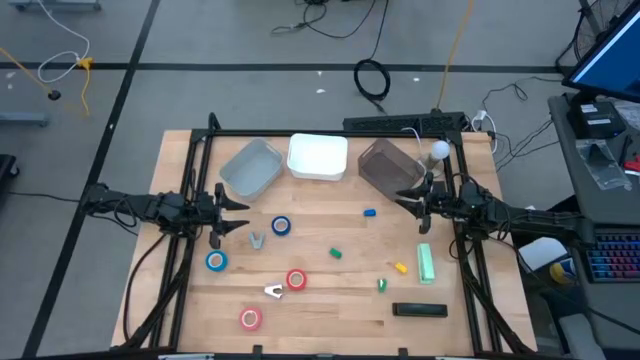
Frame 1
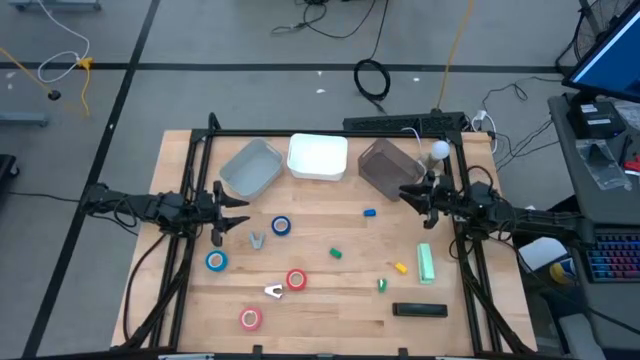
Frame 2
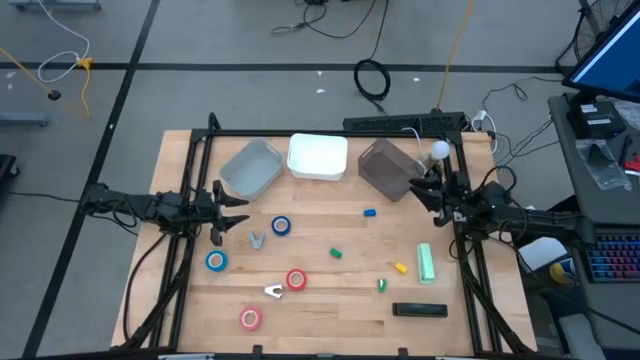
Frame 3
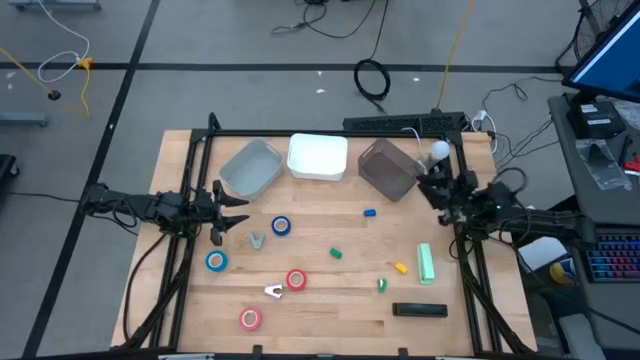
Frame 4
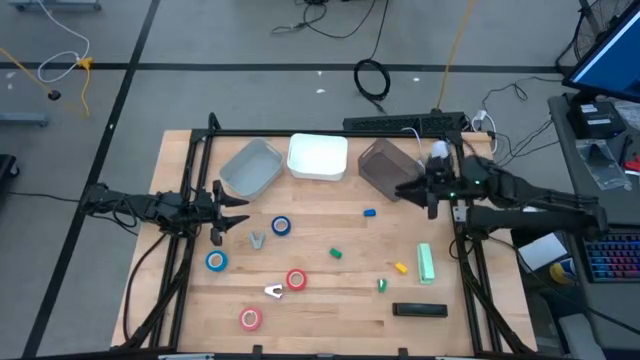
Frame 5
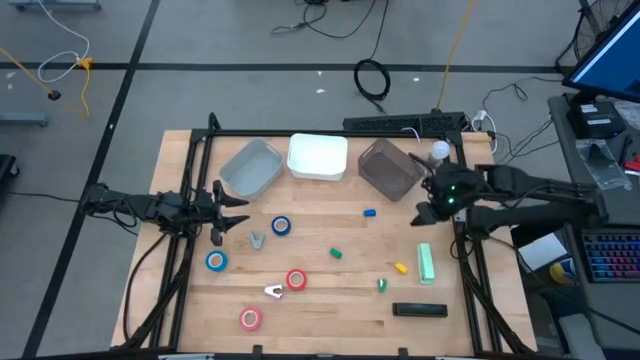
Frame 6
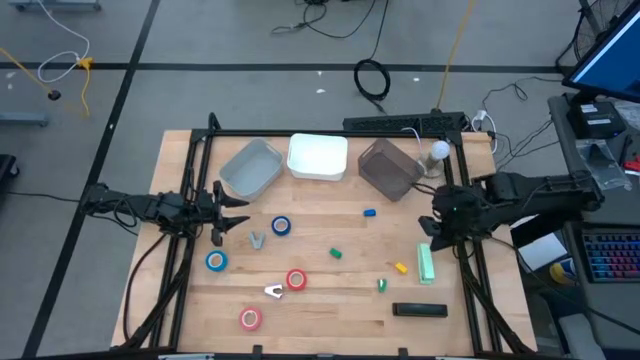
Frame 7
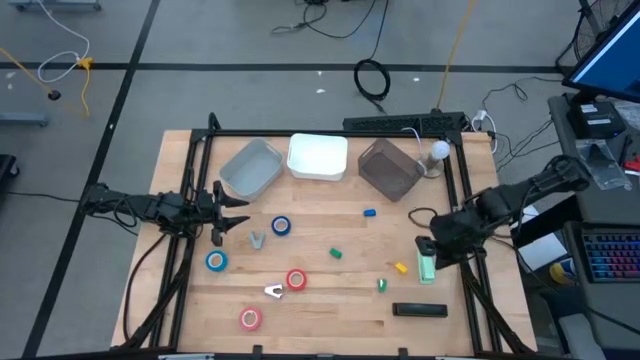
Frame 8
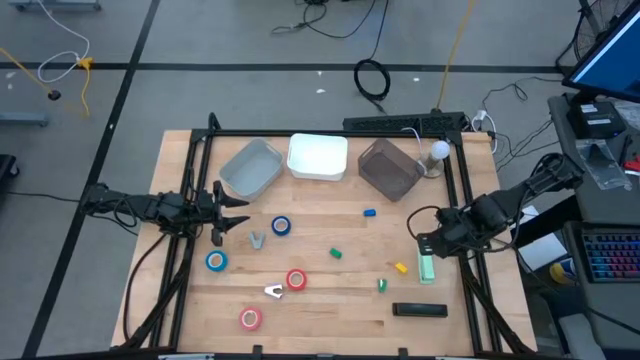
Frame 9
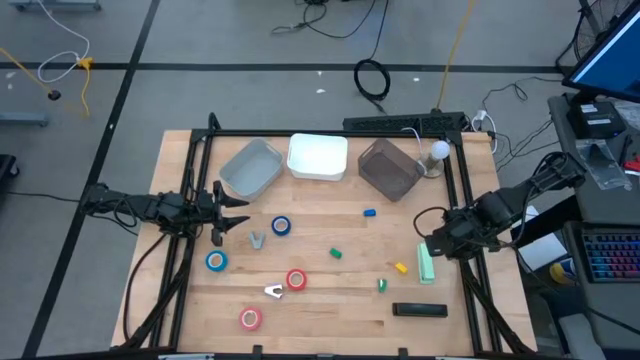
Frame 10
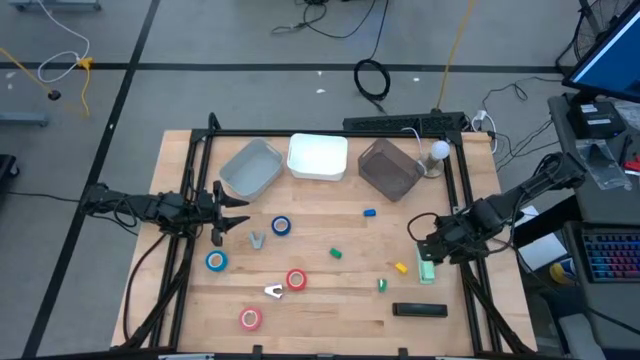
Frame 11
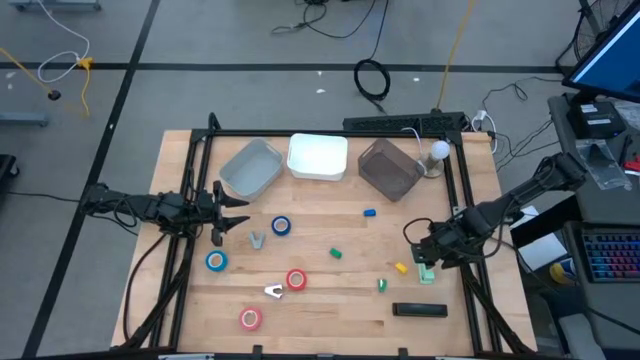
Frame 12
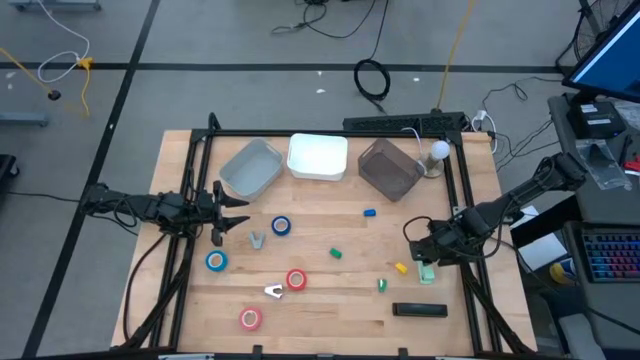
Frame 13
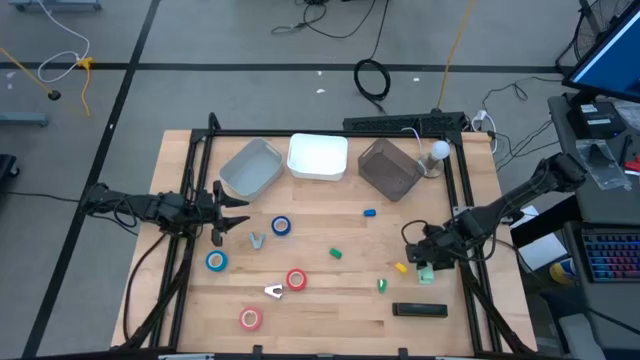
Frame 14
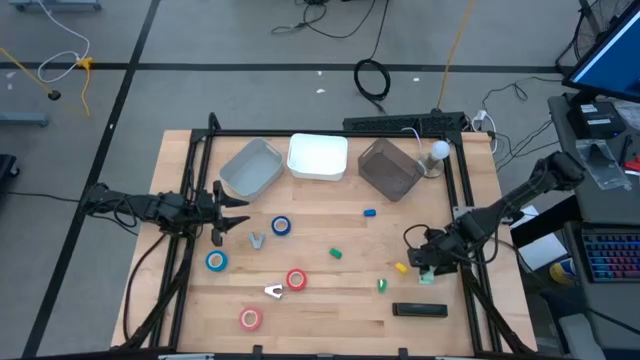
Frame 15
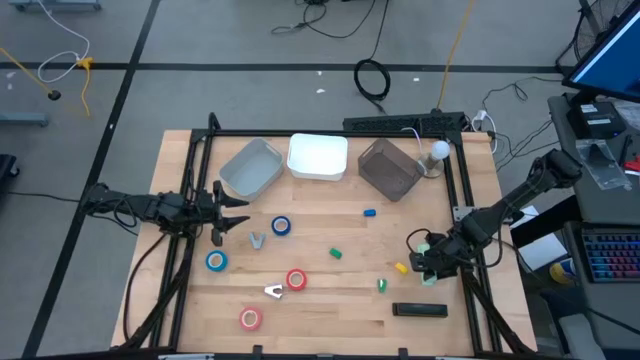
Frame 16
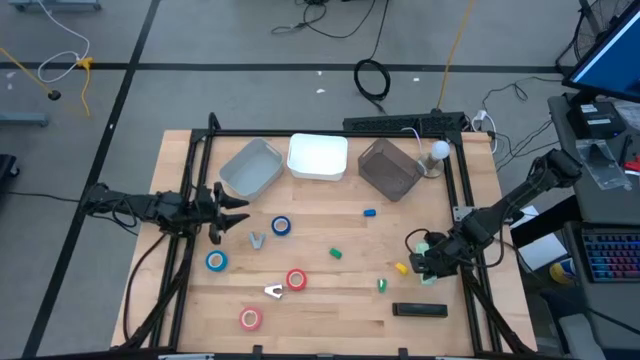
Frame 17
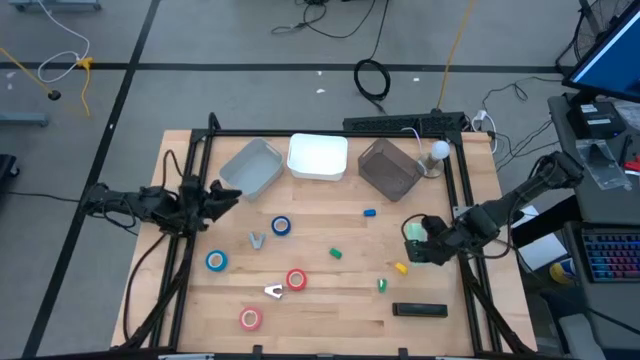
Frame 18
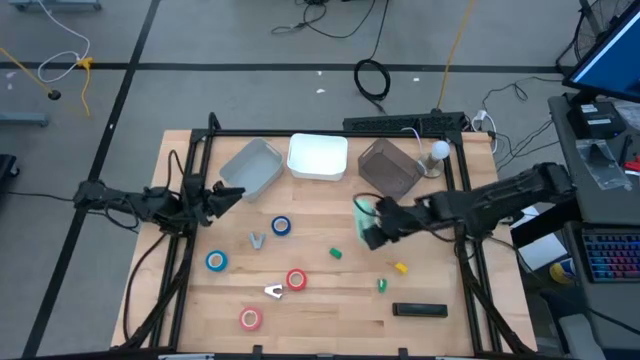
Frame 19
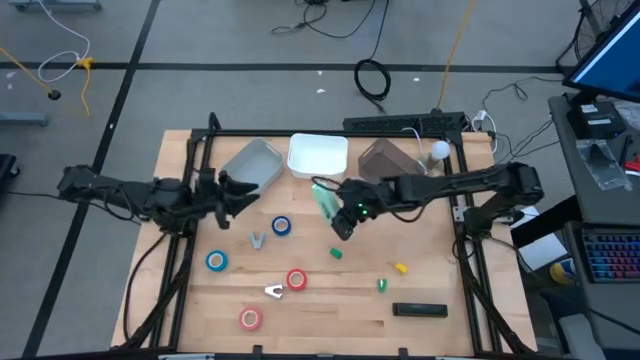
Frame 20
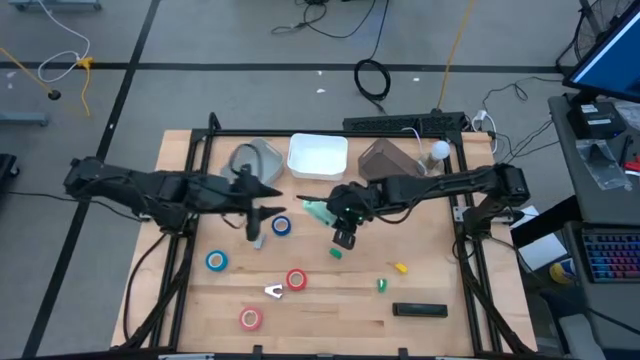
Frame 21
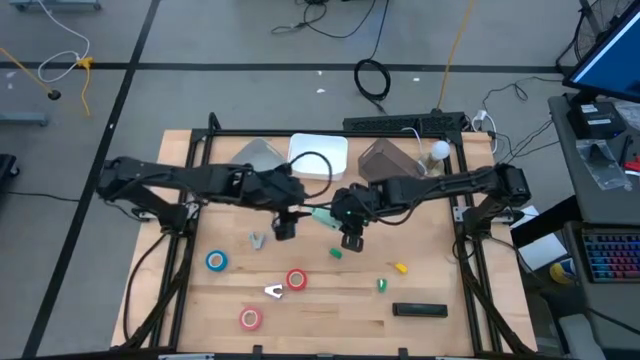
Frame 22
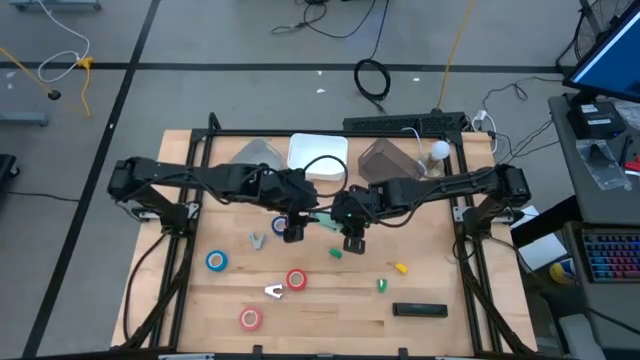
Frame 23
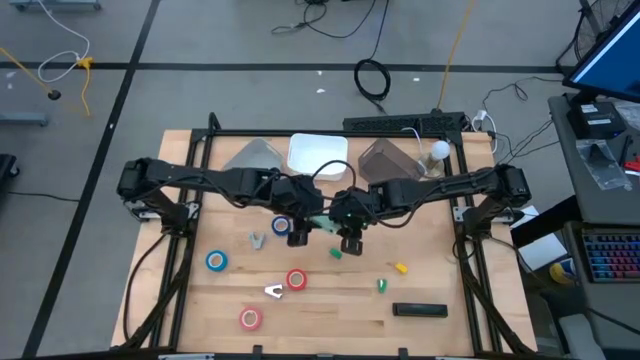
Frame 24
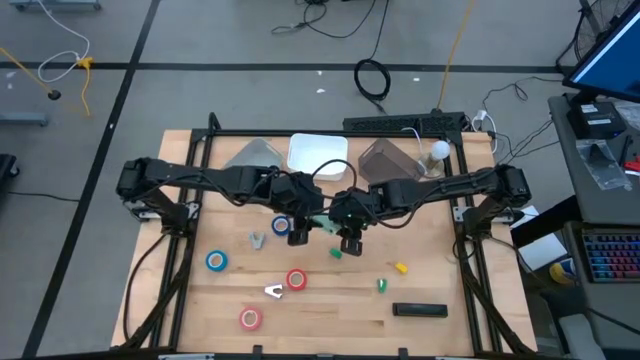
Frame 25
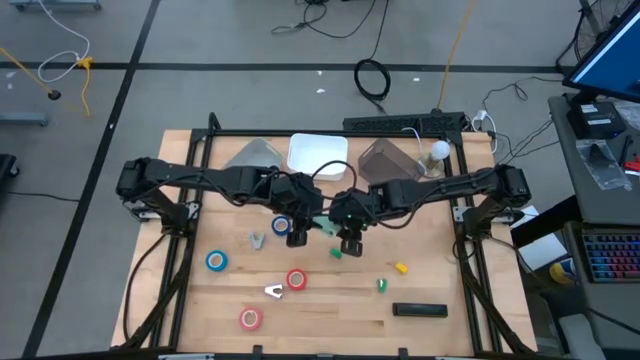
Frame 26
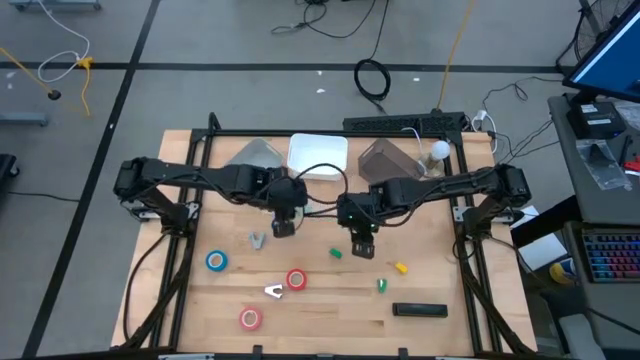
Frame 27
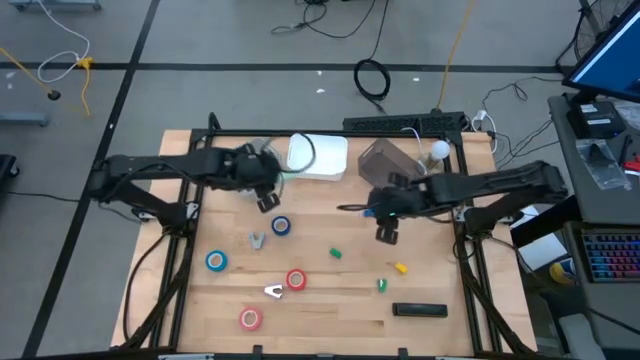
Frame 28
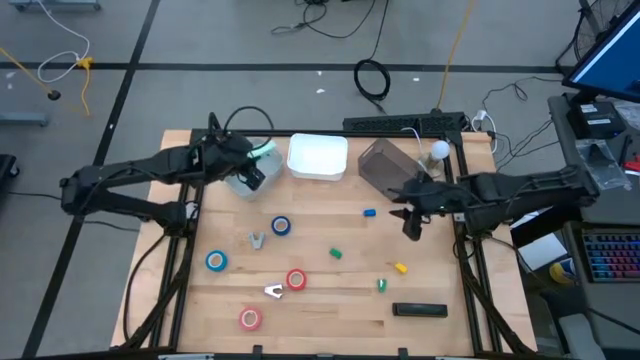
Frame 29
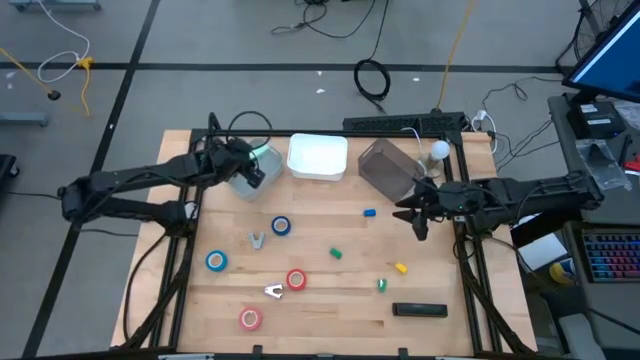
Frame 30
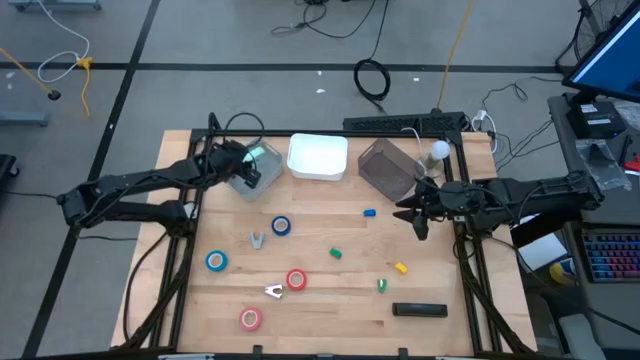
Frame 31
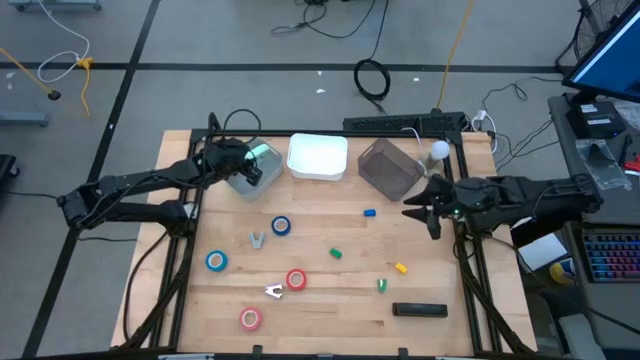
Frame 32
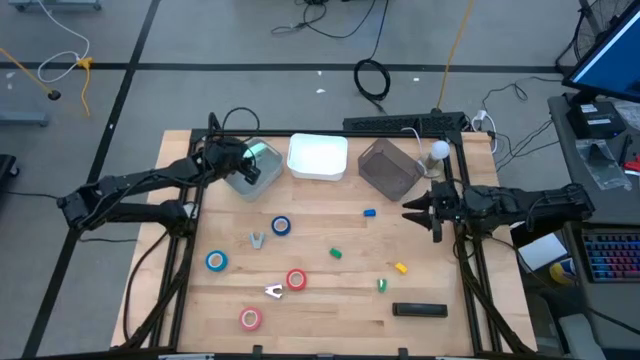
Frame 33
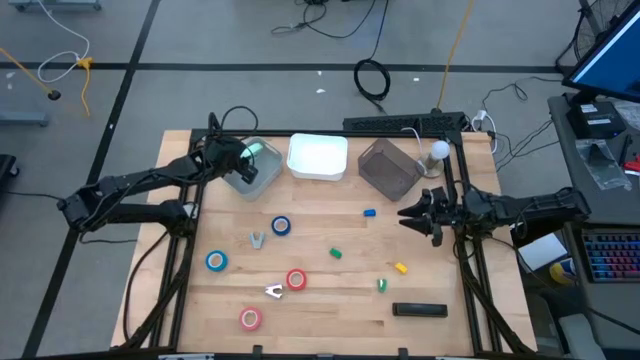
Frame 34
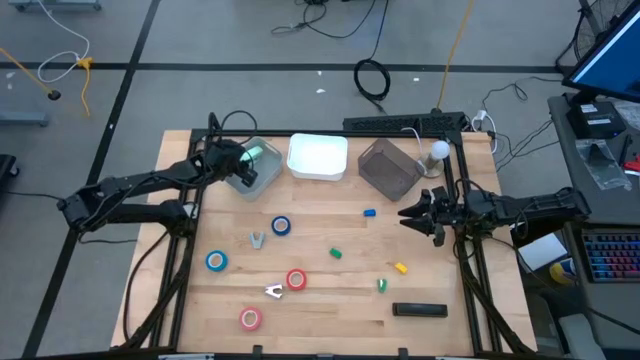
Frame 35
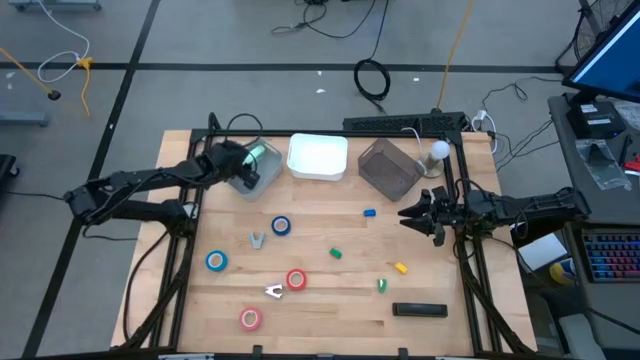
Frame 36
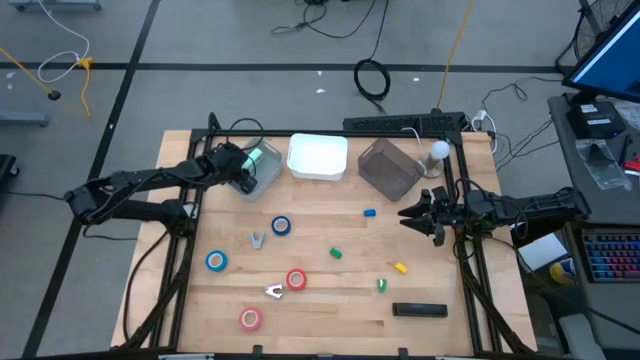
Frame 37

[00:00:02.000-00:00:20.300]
Task: Pick and place Stapler, Stapler remover, tape
Put the light green stapler into the gray bin

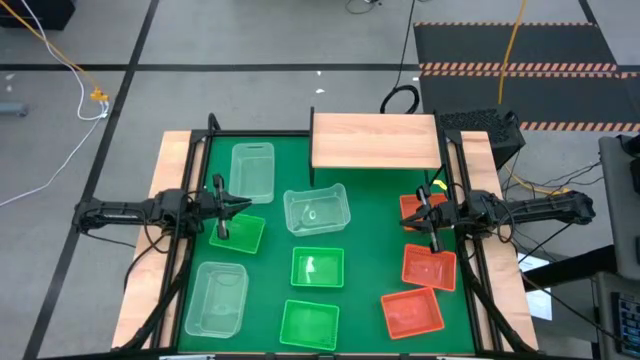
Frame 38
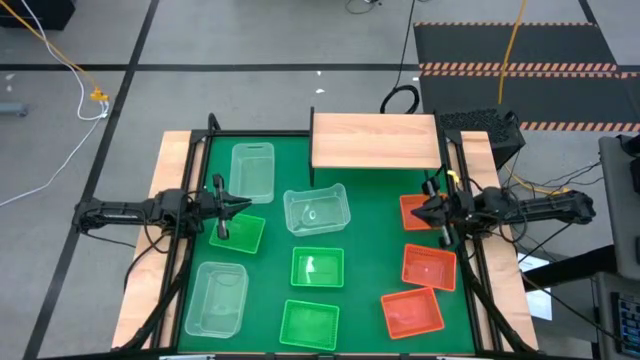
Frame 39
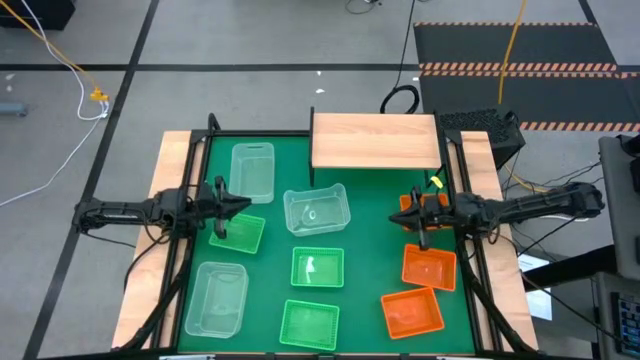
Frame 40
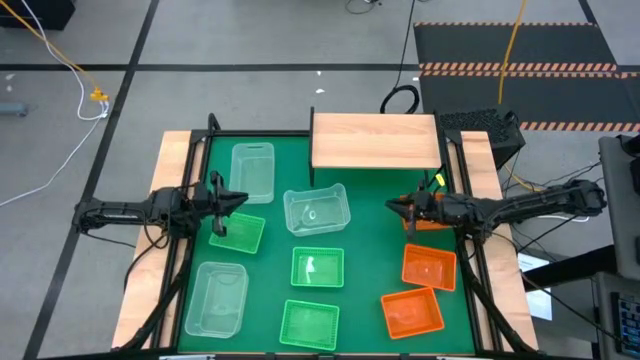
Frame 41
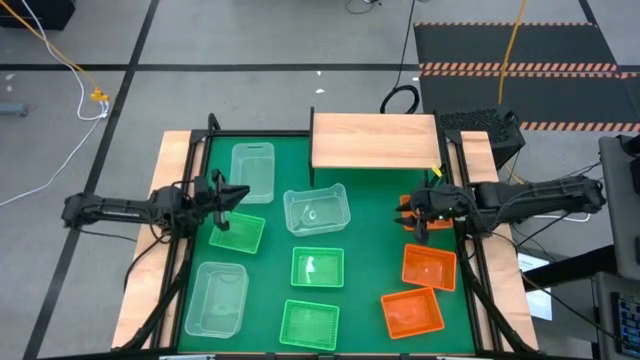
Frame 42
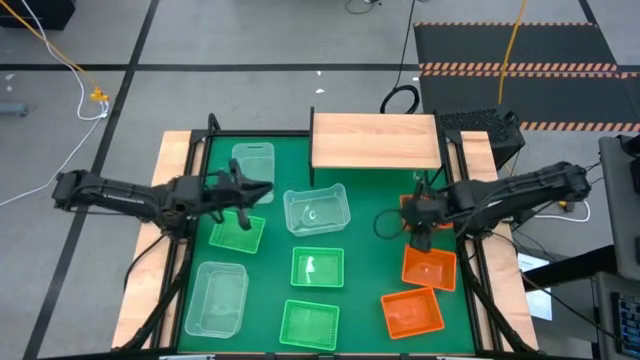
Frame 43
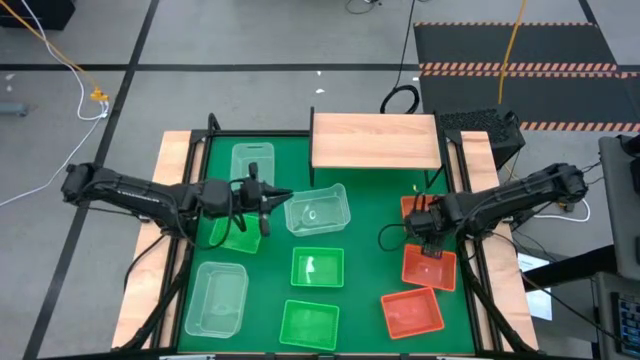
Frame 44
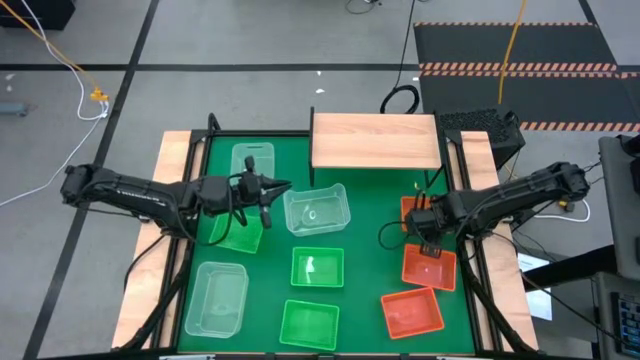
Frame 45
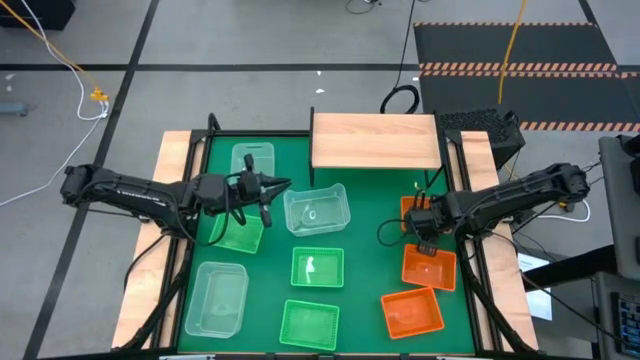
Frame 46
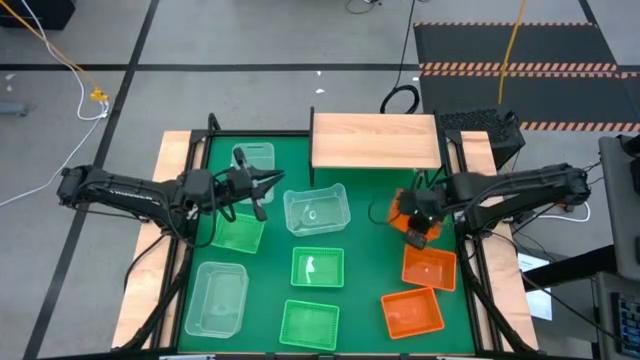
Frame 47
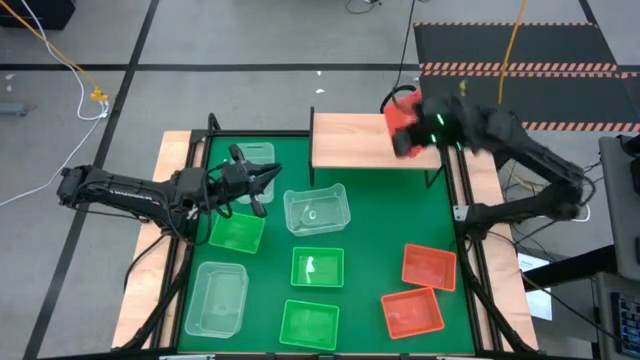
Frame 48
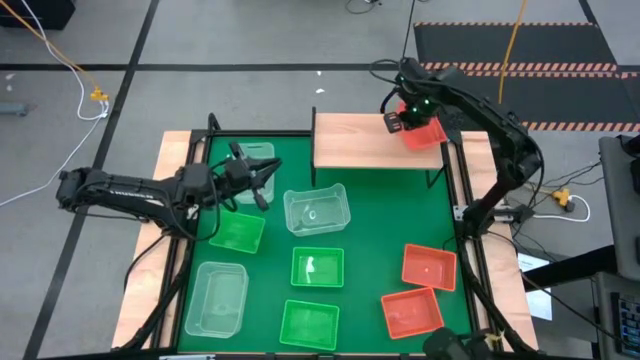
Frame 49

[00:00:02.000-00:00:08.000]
Task: Stack baskets on shelf by color
Put the top orange bin on the shelf
